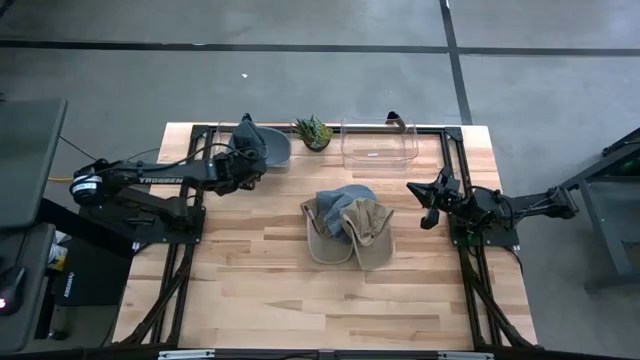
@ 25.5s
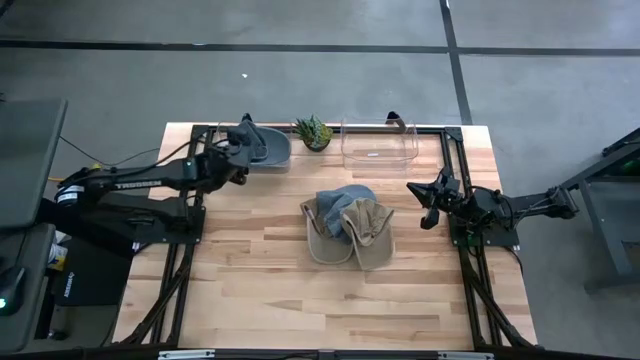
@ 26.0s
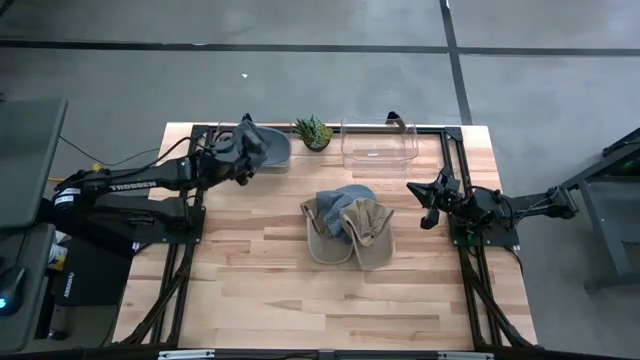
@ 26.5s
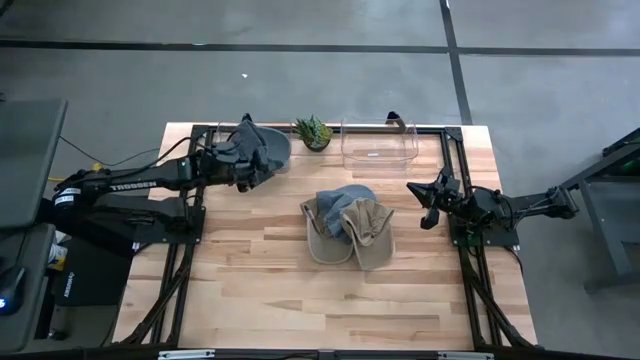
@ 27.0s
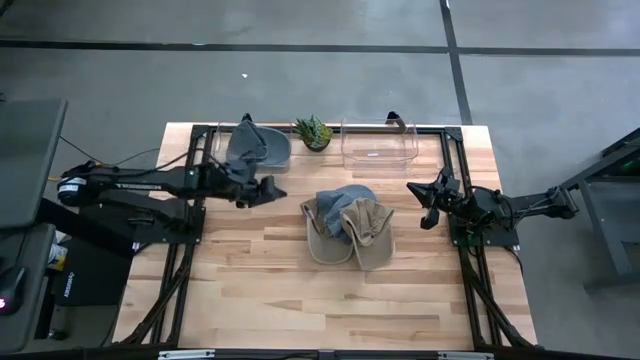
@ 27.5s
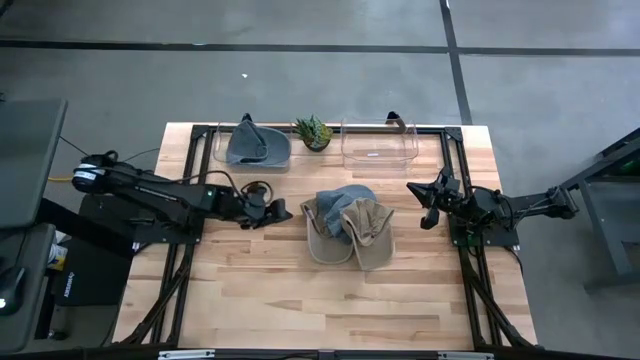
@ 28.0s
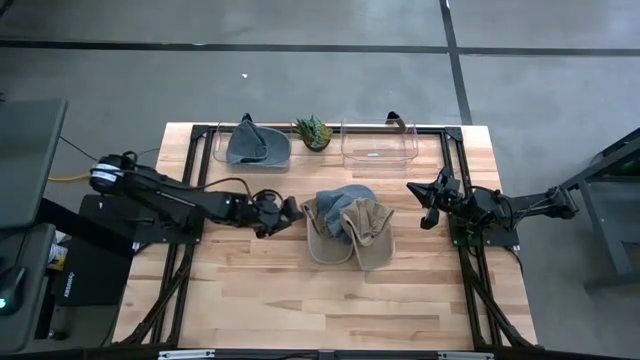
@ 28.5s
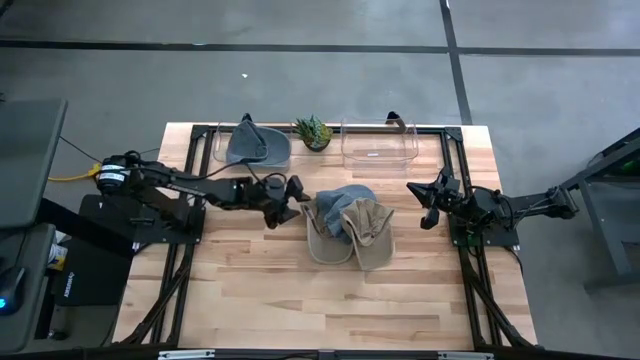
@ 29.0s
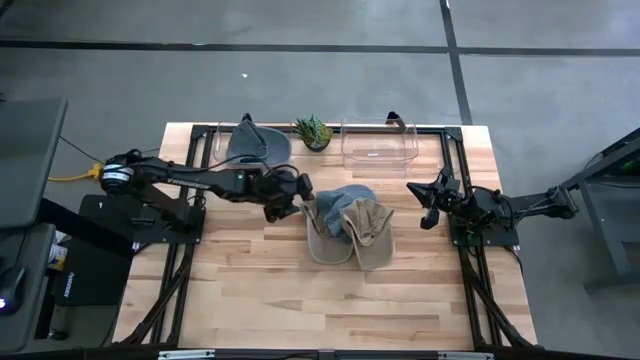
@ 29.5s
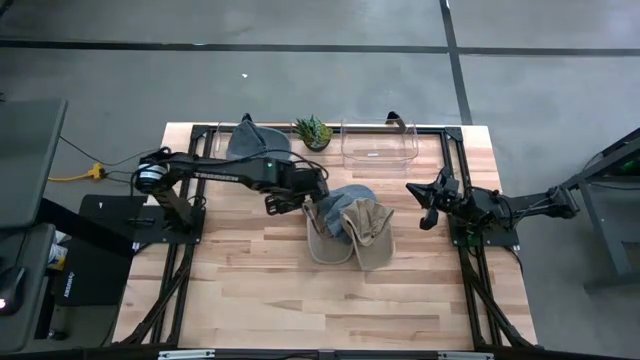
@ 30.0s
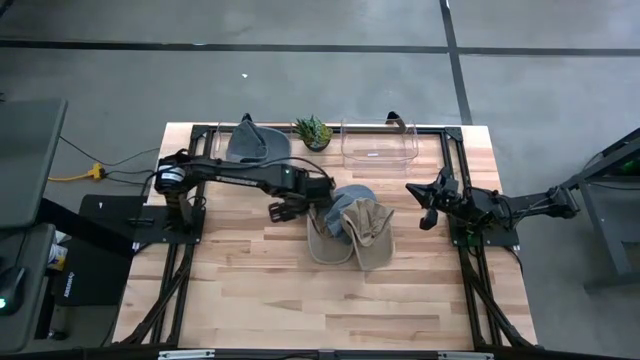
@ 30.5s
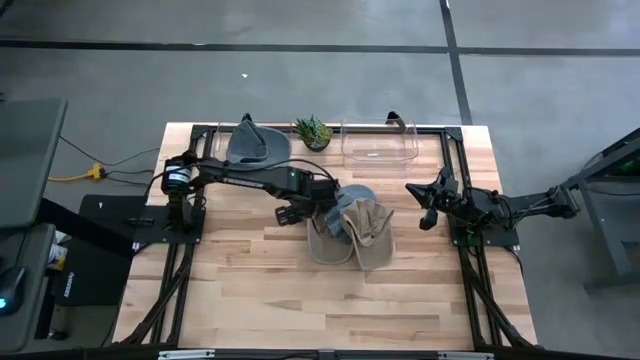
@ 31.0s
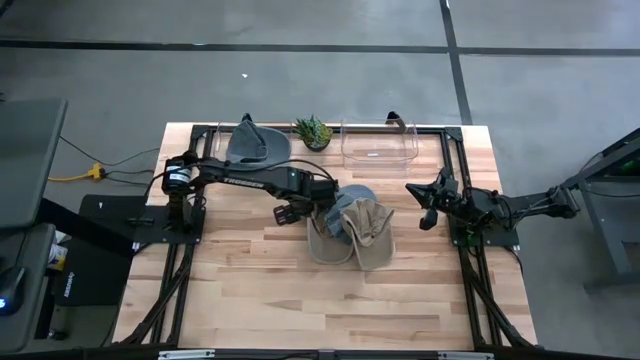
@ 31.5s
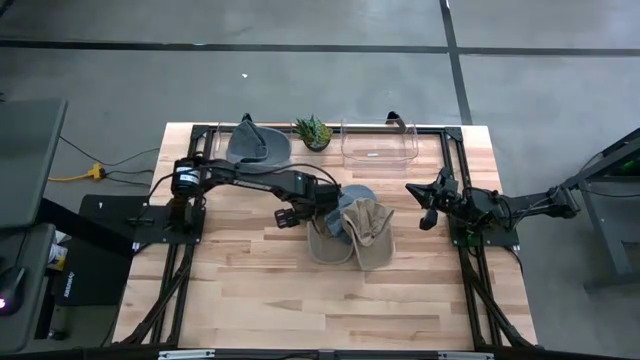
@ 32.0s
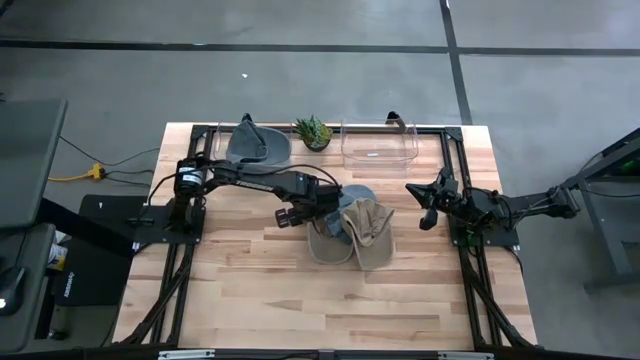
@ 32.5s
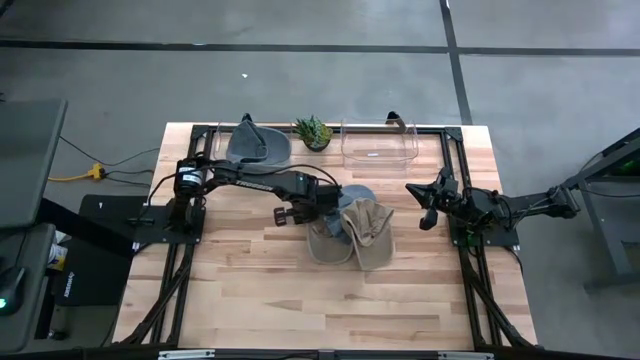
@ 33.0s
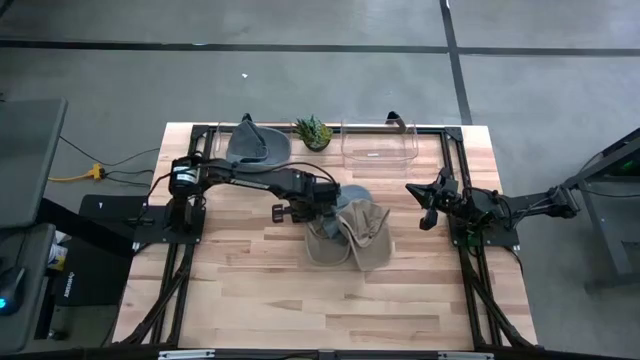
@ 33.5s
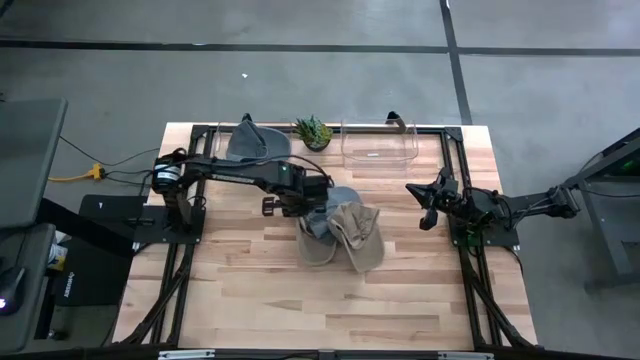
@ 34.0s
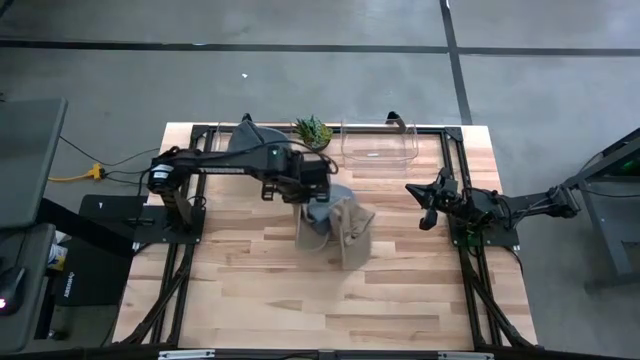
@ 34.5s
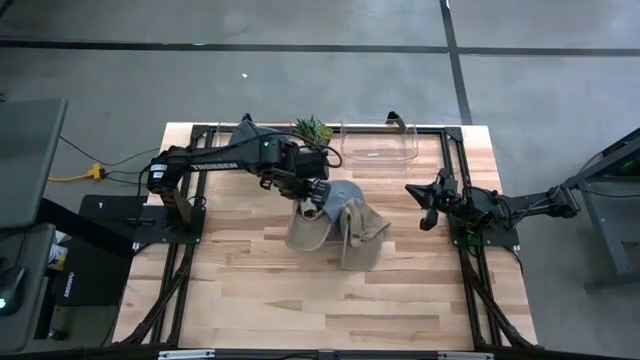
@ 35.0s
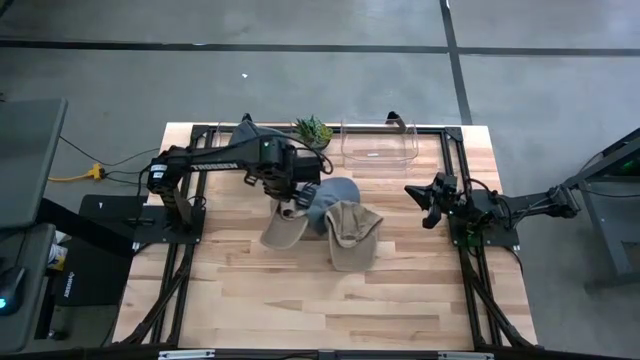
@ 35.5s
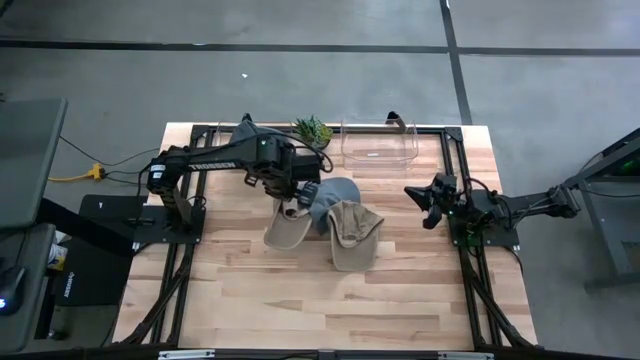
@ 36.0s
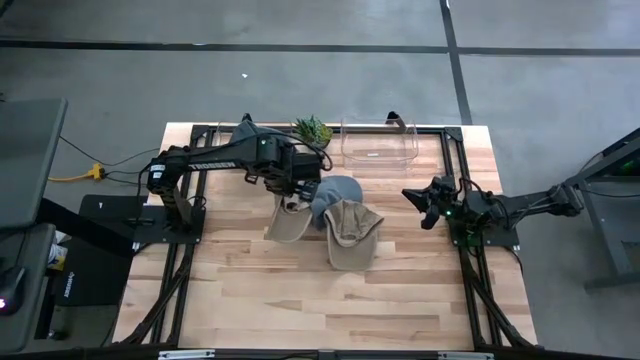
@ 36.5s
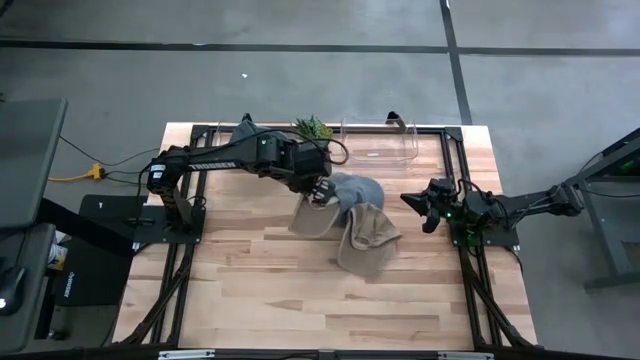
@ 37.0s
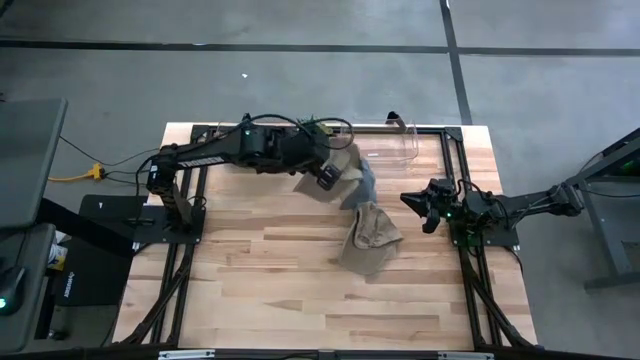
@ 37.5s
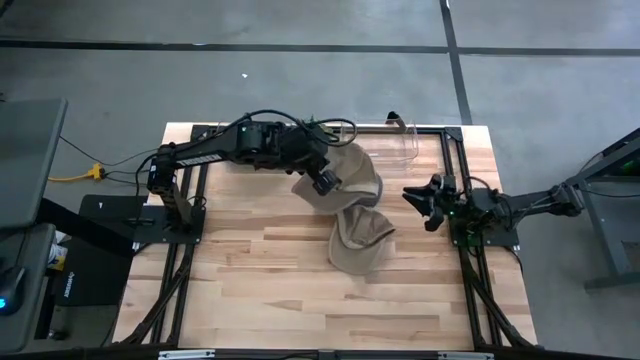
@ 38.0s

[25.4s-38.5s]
Task: Pick & Place hat
Put the left brown cap into the right transparent bin

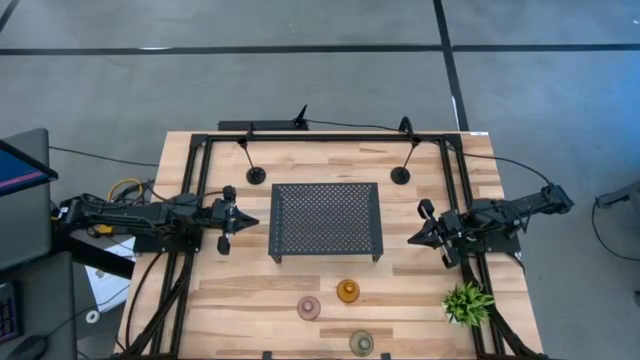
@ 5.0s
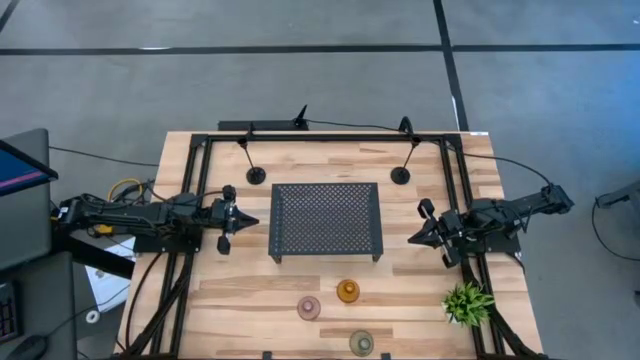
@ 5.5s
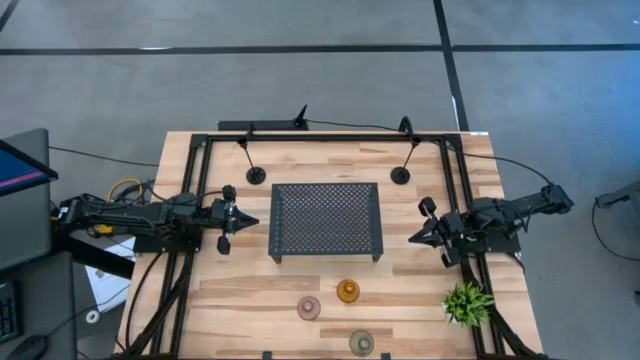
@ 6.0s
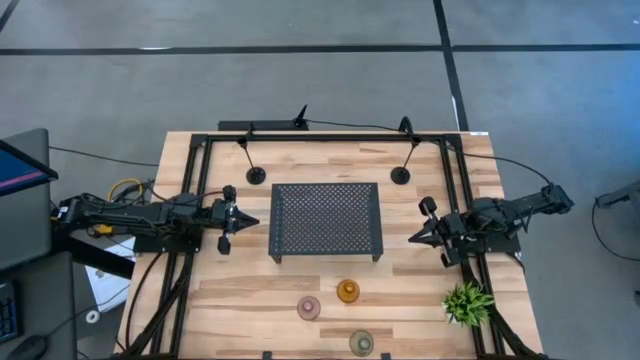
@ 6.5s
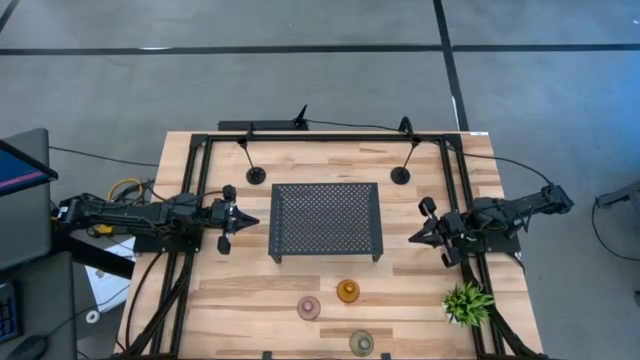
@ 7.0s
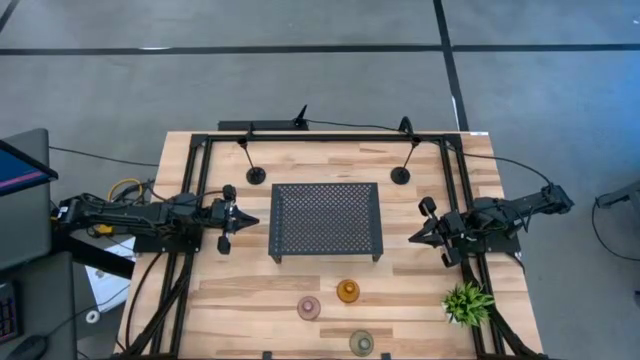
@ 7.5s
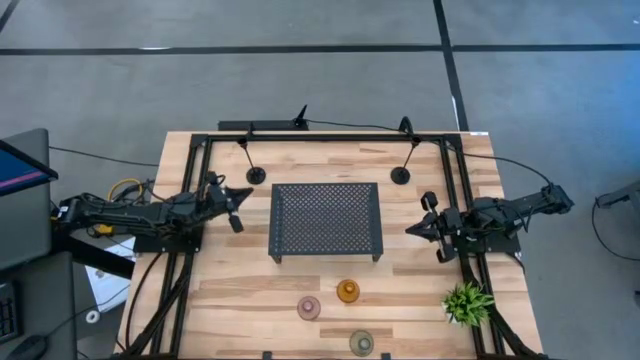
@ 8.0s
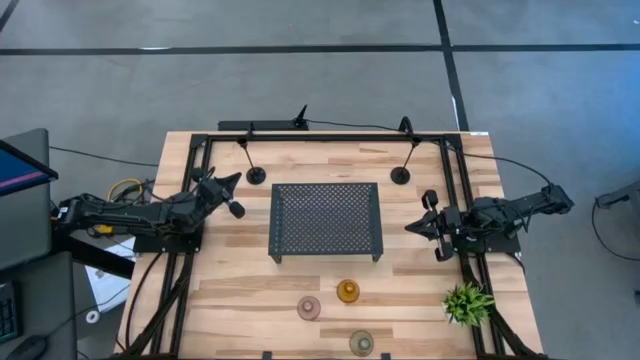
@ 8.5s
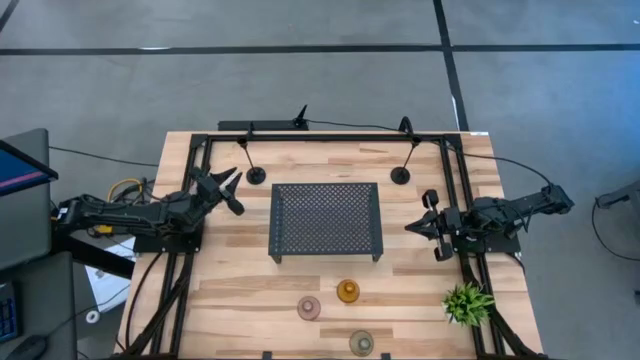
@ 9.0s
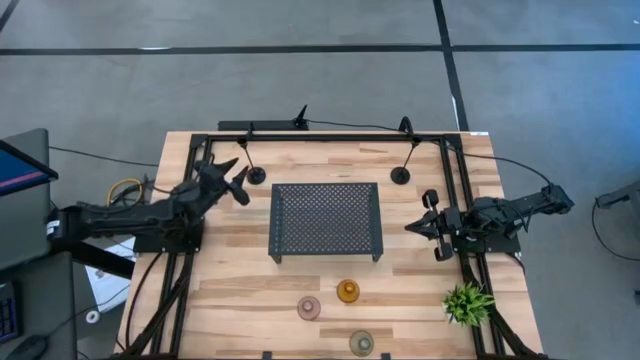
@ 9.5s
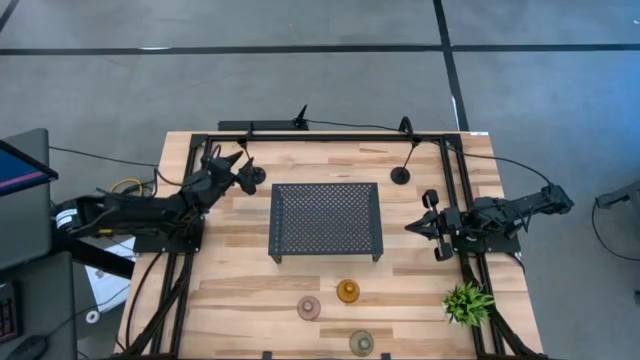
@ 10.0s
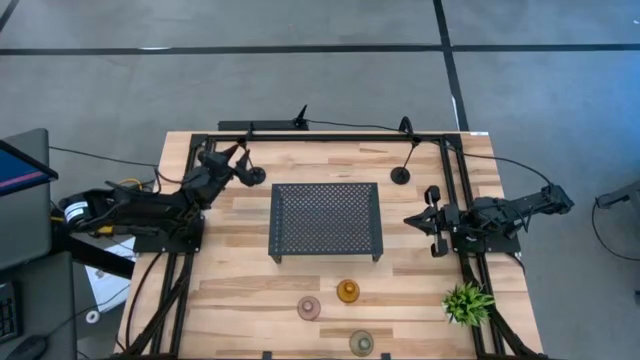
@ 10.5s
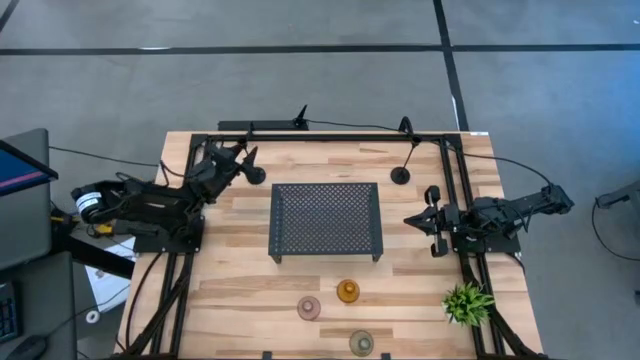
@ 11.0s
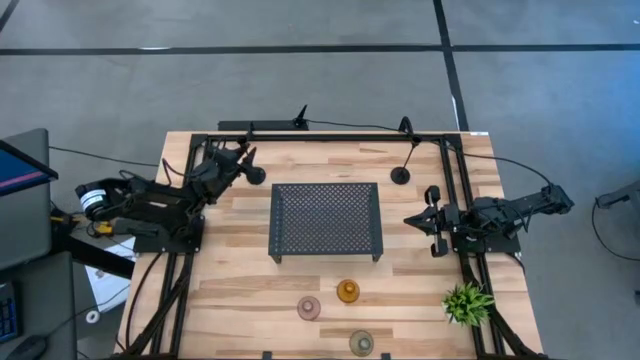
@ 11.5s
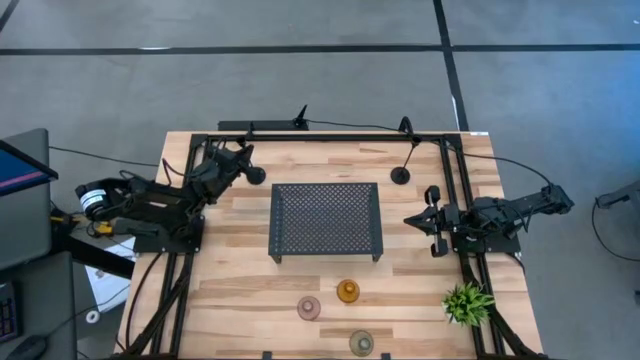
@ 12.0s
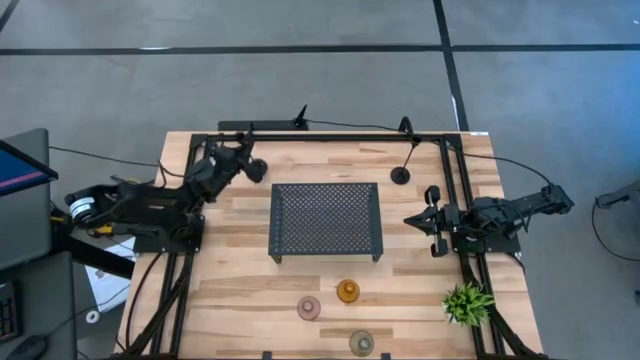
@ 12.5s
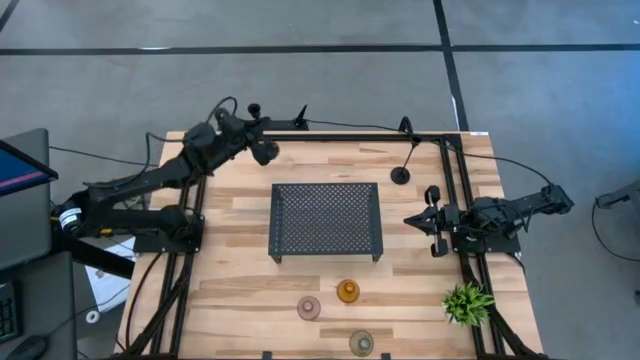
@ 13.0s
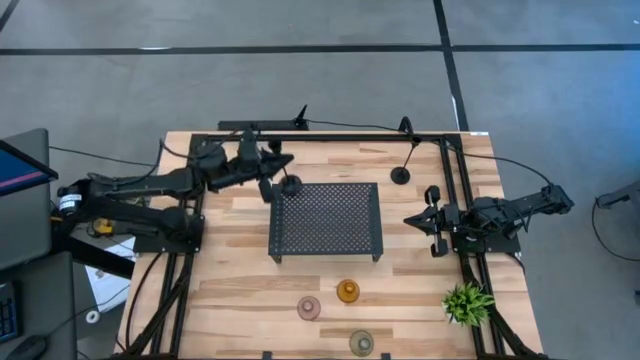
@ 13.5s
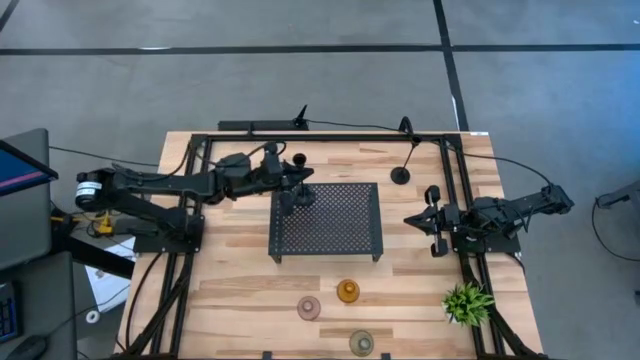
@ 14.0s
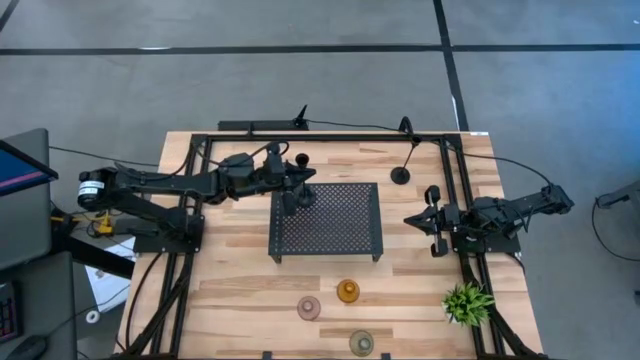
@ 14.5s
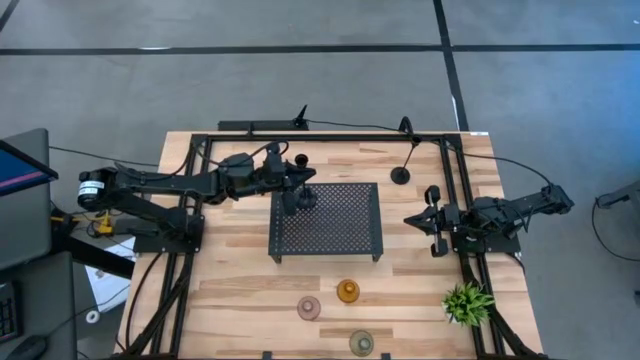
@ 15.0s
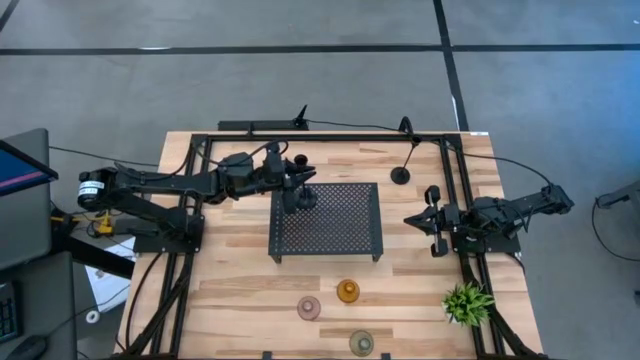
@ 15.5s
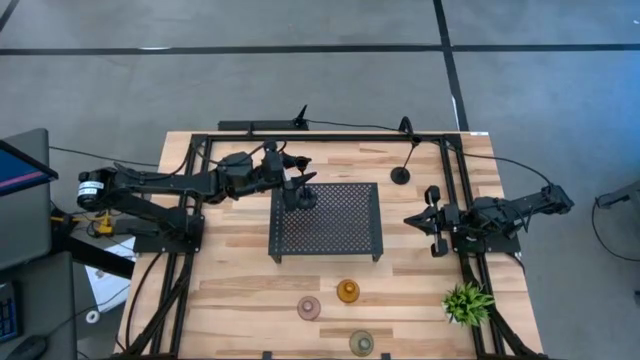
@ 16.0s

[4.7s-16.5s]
Task: Pick & Place candle stick holders
Put the left black candle holder on the shelf
